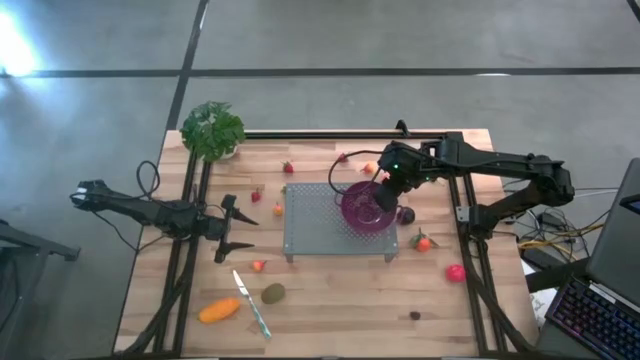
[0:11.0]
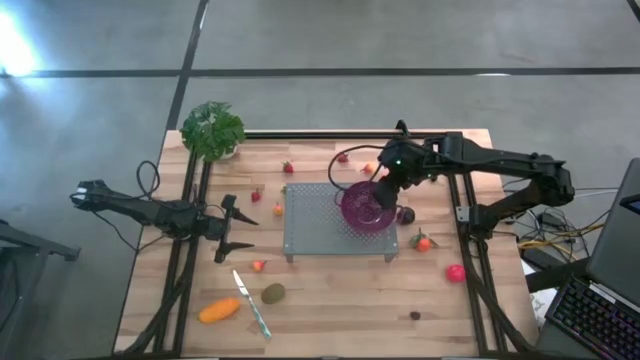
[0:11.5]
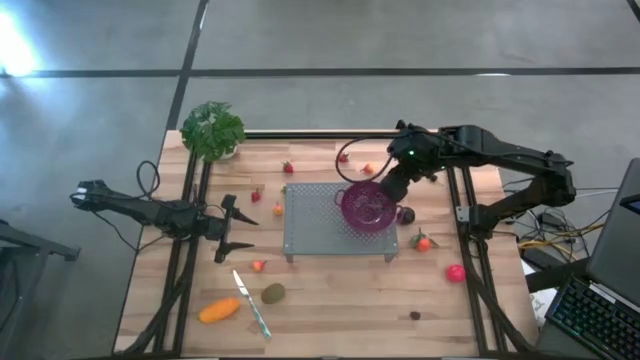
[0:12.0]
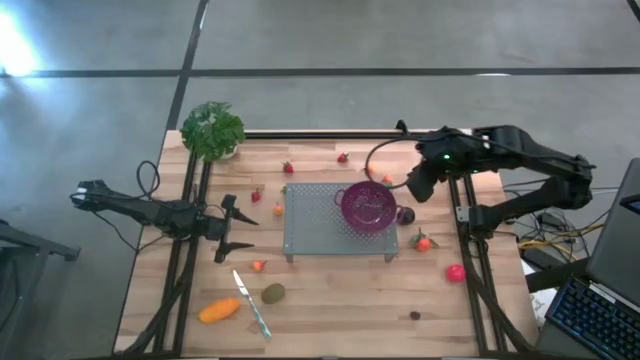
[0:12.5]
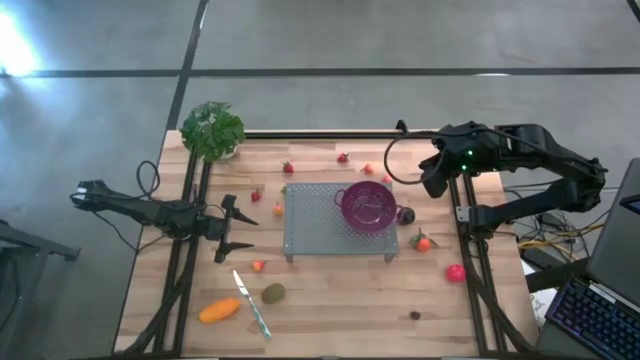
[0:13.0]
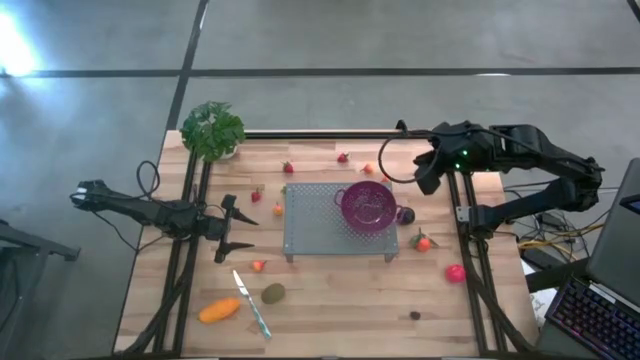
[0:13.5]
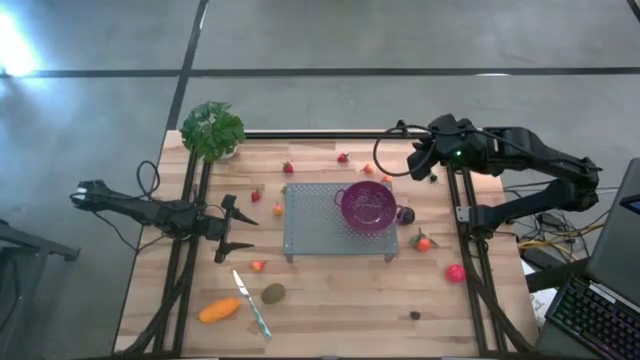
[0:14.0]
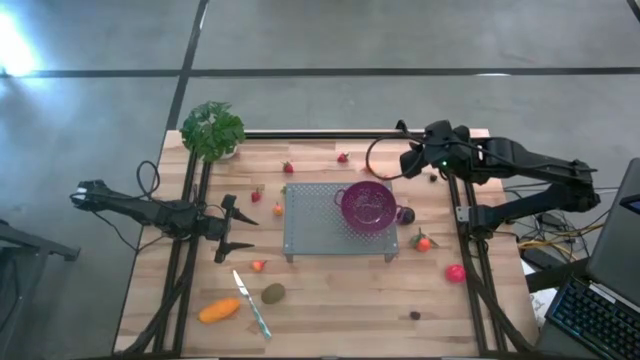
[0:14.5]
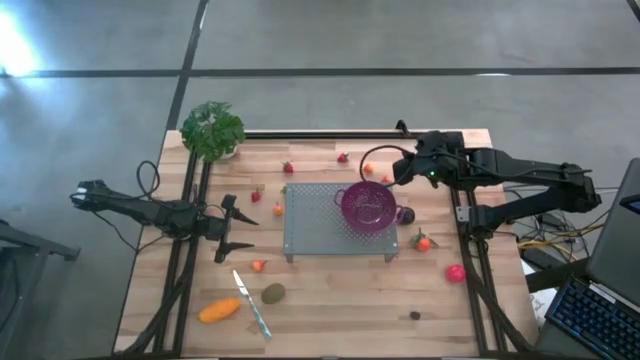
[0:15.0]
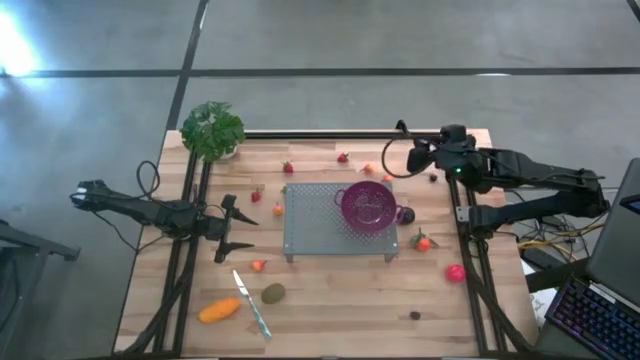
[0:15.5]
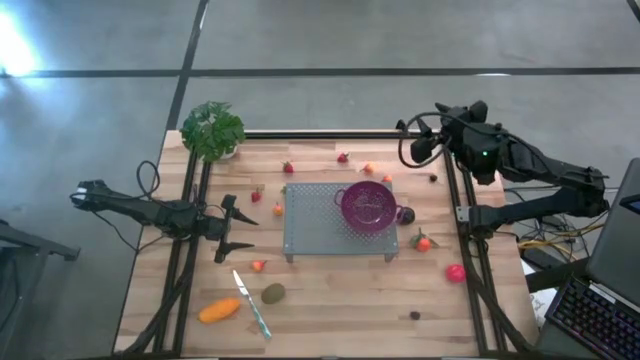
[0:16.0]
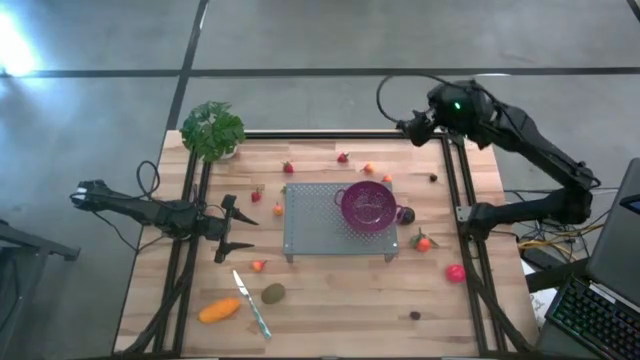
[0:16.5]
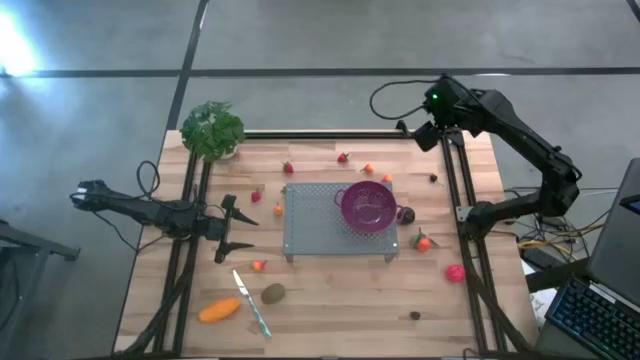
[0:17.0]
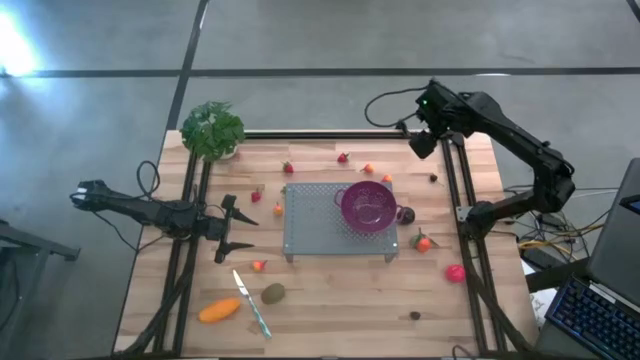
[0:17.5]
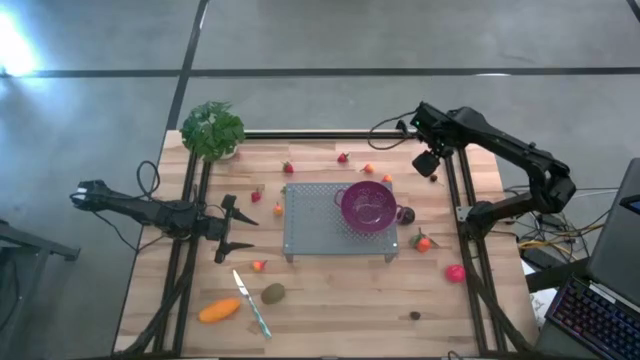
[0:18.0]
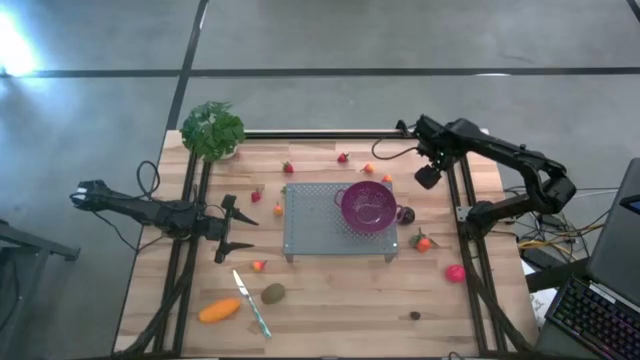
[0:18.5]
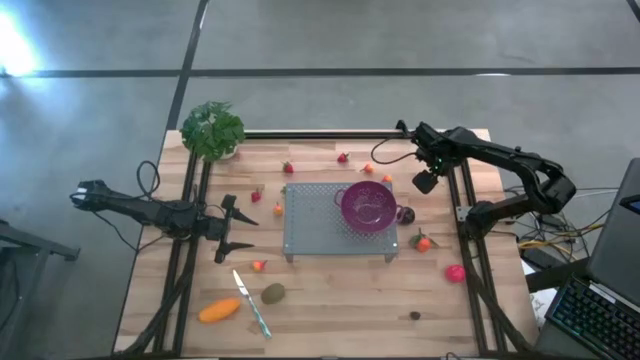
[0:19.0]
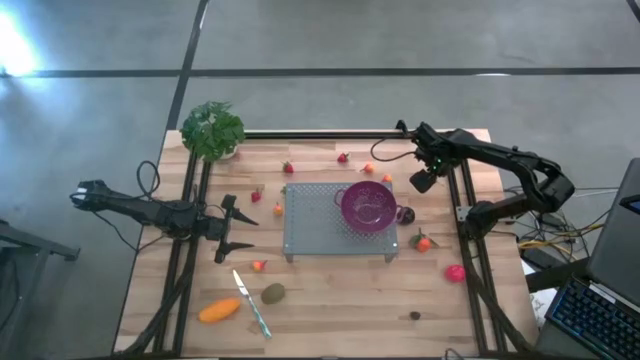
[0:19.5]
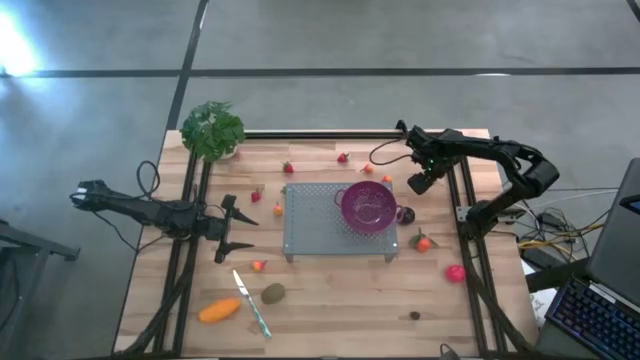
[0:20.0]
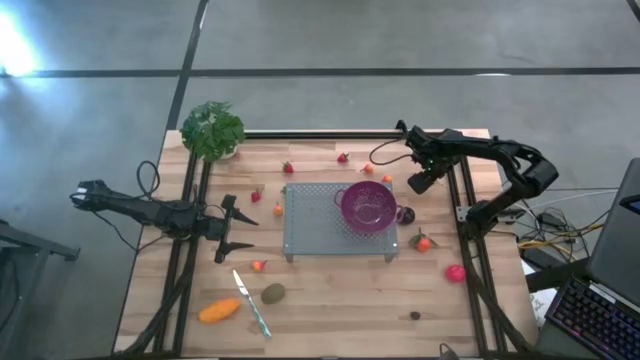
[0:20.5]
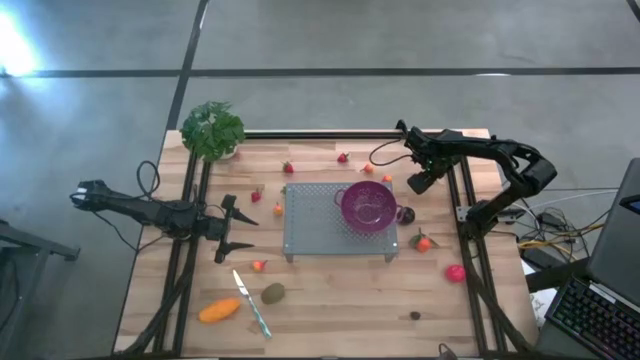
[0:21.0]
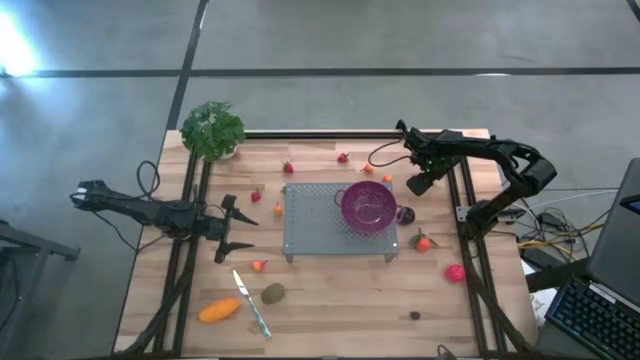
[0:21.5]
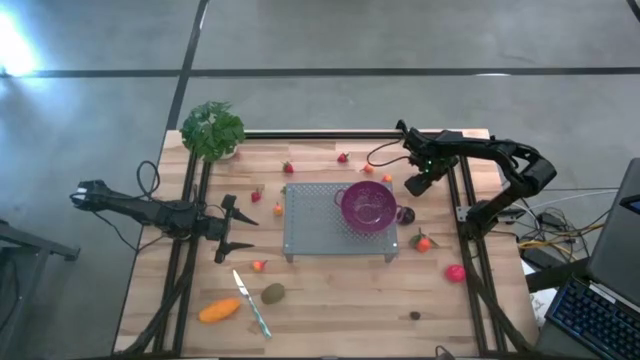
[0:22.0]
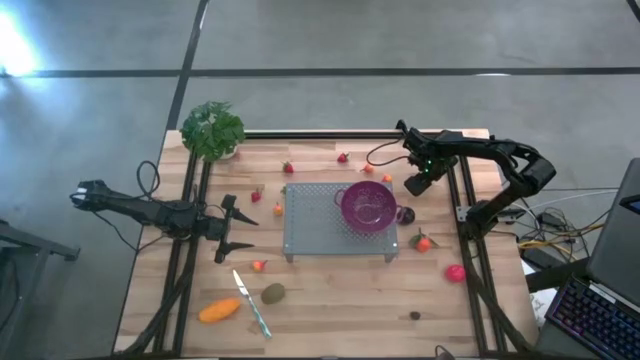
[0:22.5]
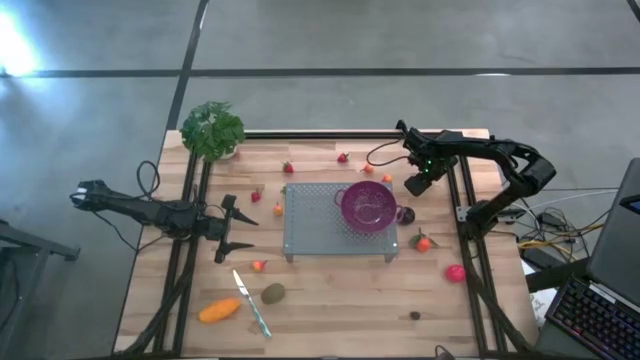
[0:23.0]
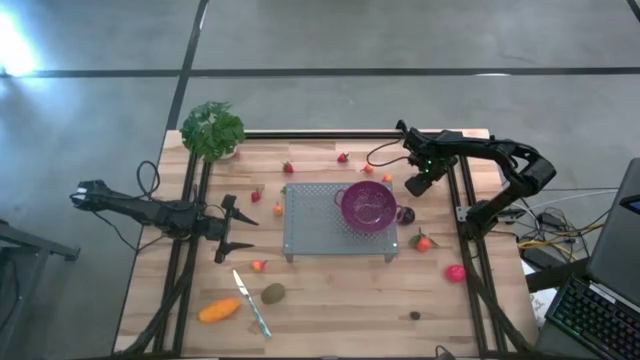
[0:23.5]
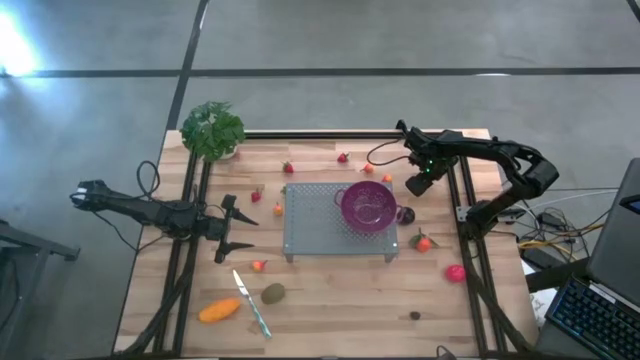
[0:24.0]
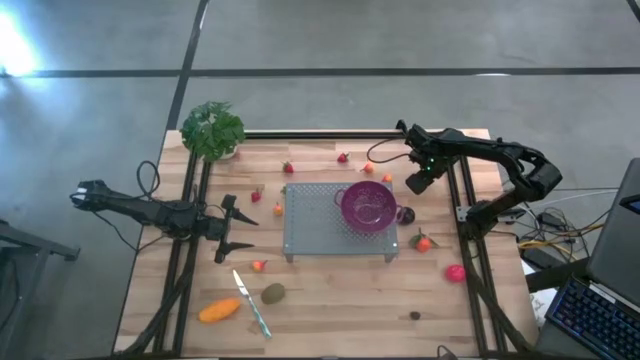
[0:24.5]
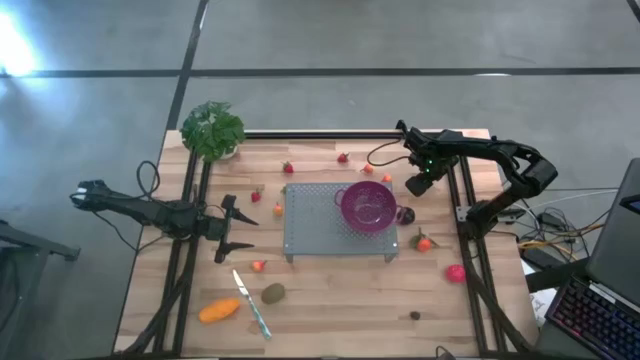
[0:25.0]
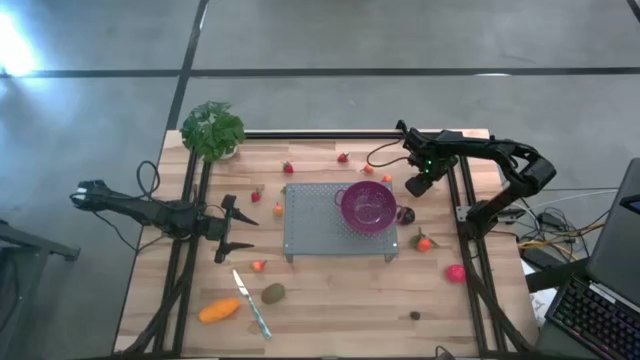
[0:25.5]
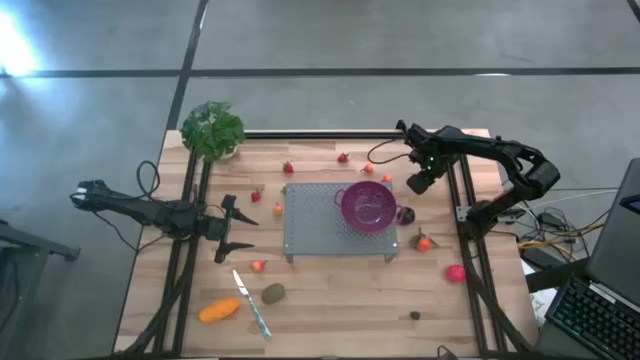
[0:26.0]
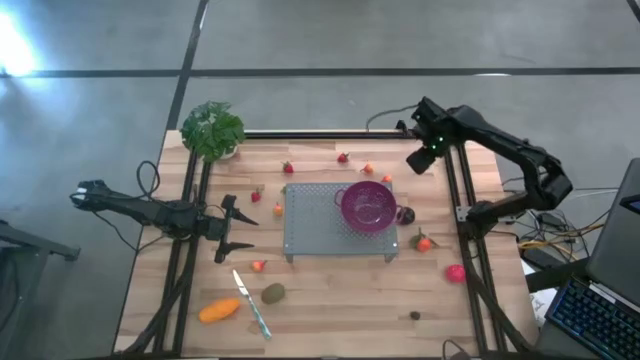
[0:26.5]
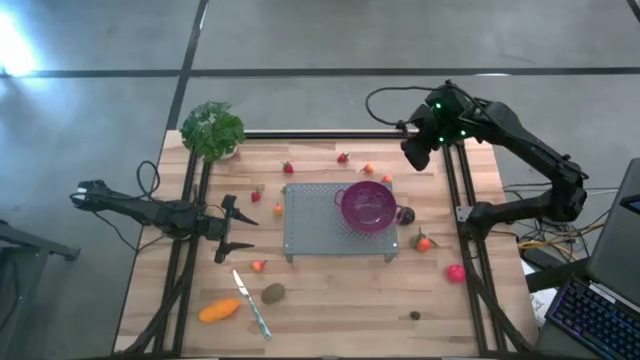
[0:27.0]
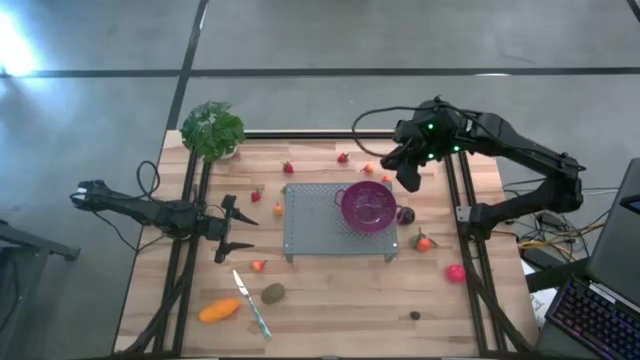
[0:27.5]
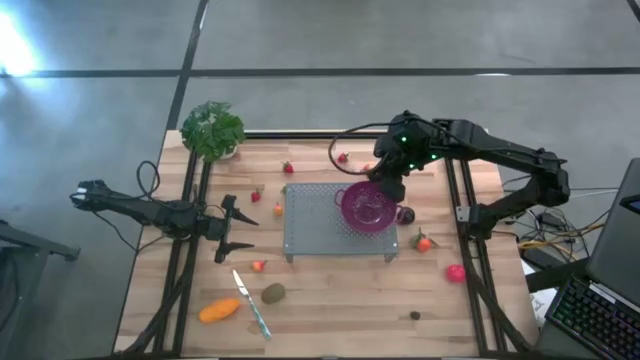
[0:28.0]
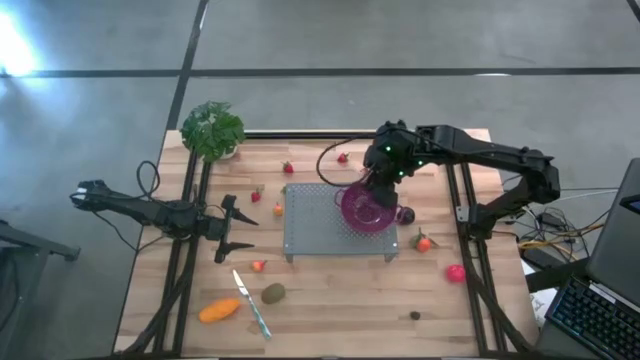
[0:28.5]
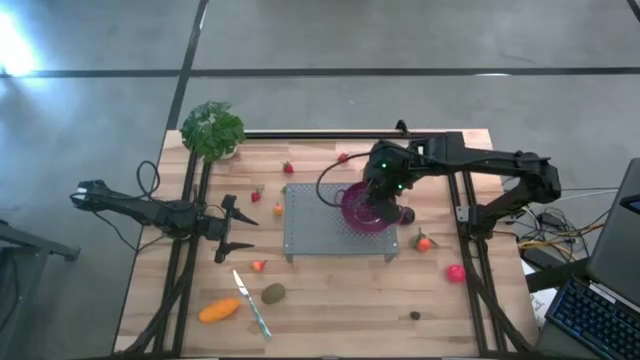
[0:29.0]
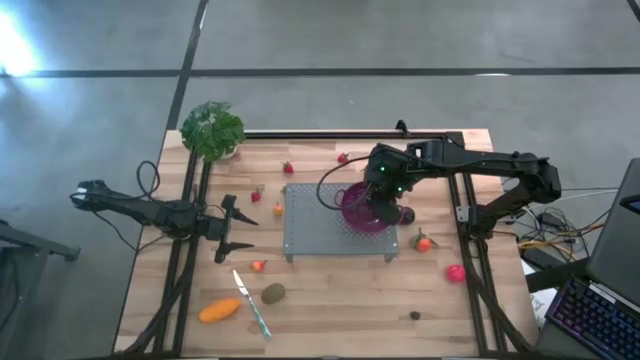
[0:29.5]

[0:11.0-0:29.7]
Task: Pick & Place Fruit
Put the black cherry in the purple strainer bowl on the shelf
